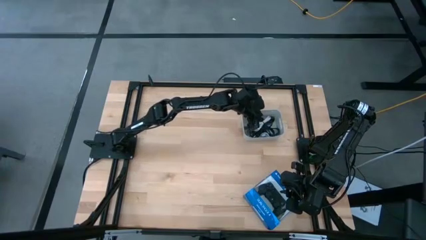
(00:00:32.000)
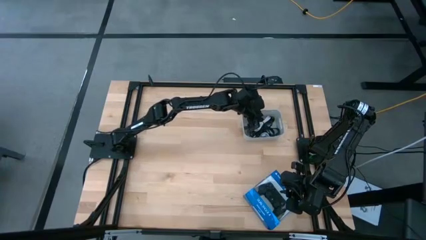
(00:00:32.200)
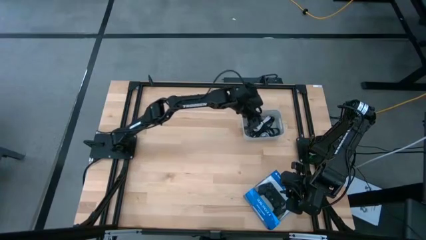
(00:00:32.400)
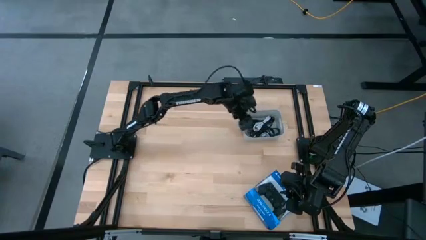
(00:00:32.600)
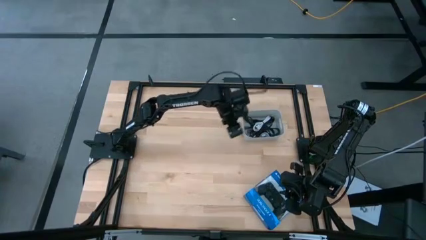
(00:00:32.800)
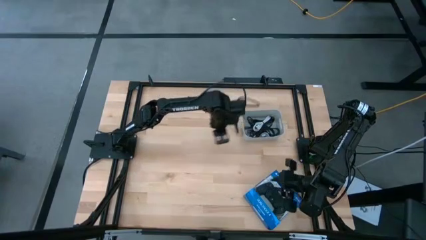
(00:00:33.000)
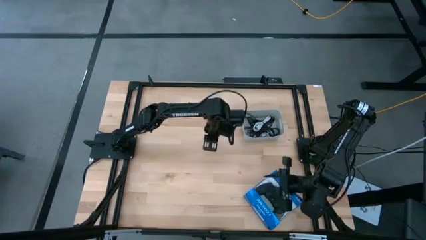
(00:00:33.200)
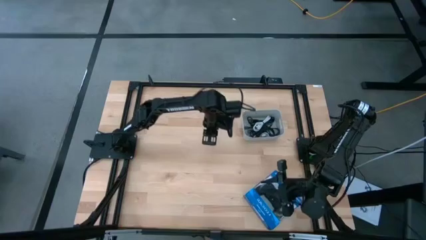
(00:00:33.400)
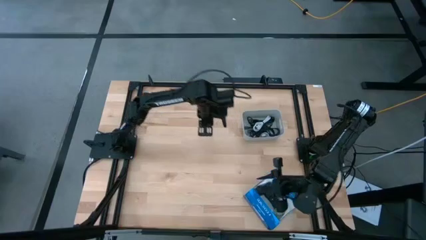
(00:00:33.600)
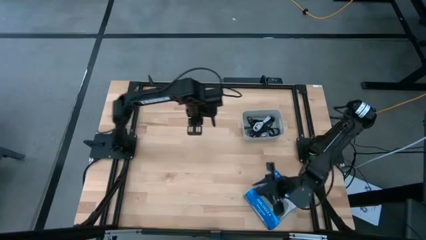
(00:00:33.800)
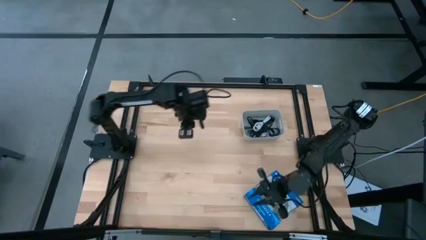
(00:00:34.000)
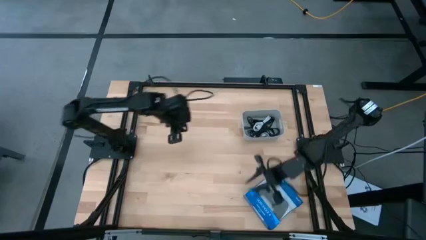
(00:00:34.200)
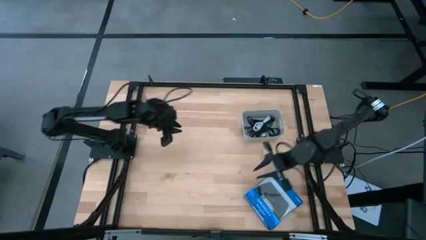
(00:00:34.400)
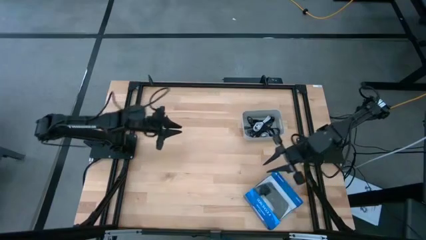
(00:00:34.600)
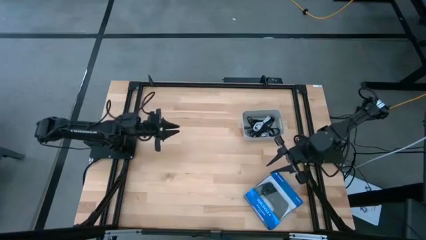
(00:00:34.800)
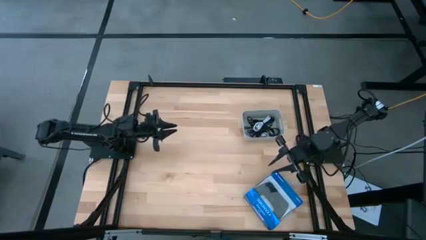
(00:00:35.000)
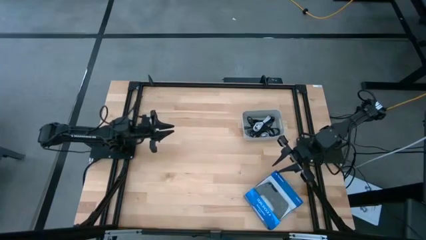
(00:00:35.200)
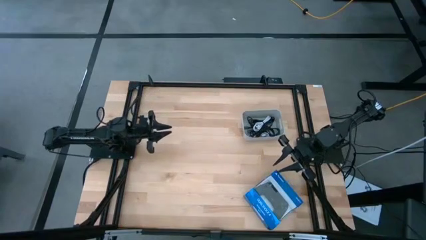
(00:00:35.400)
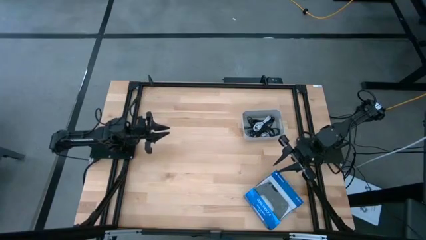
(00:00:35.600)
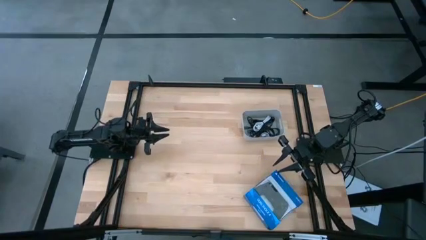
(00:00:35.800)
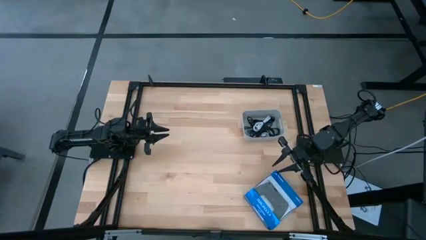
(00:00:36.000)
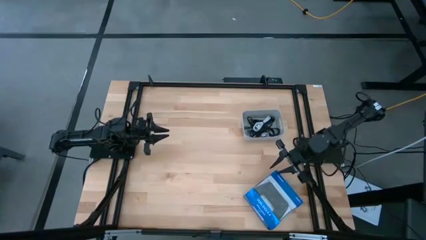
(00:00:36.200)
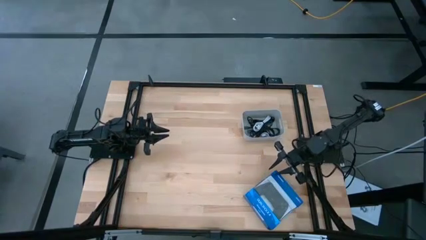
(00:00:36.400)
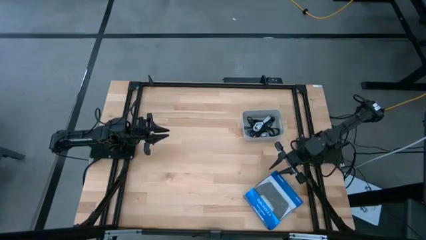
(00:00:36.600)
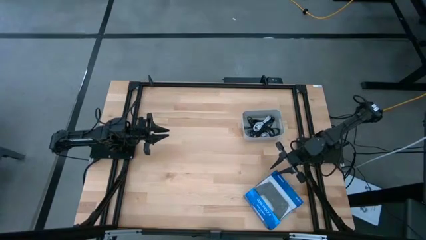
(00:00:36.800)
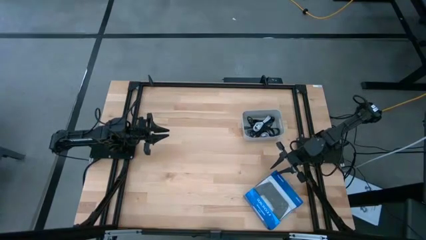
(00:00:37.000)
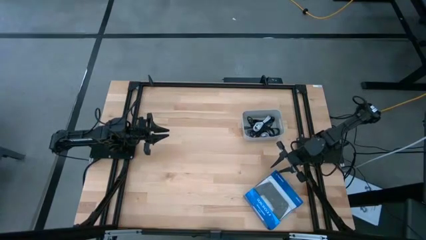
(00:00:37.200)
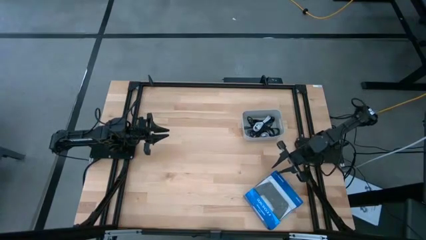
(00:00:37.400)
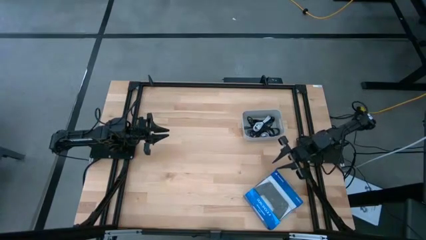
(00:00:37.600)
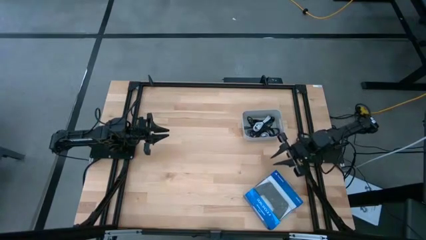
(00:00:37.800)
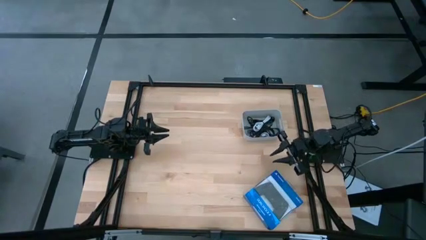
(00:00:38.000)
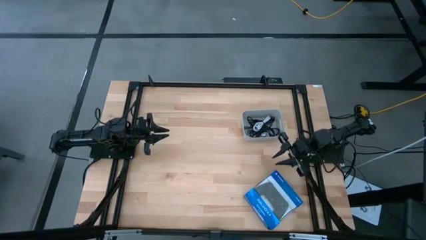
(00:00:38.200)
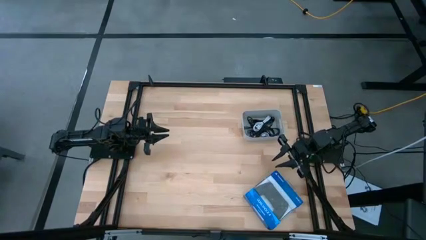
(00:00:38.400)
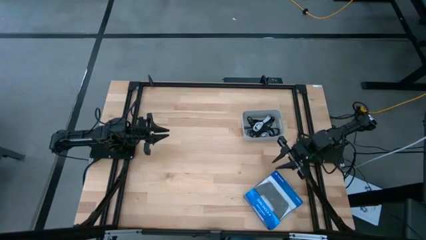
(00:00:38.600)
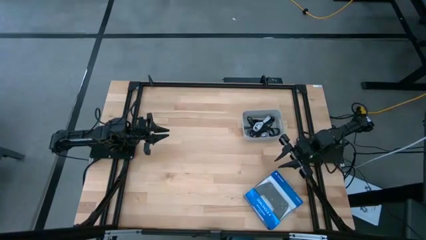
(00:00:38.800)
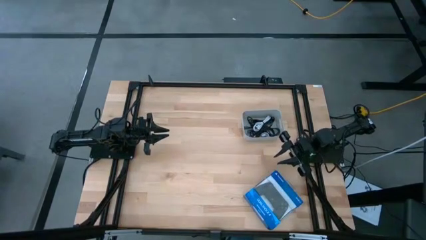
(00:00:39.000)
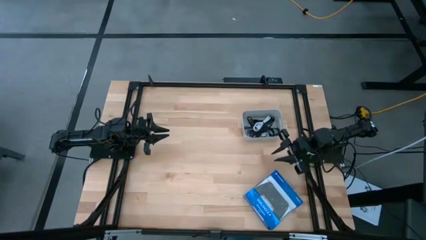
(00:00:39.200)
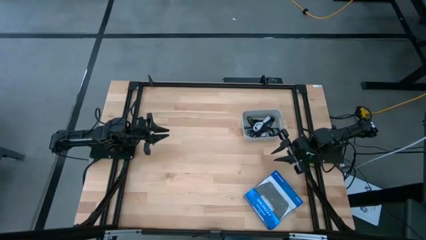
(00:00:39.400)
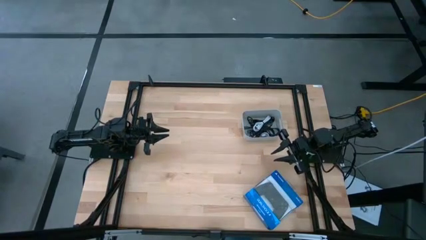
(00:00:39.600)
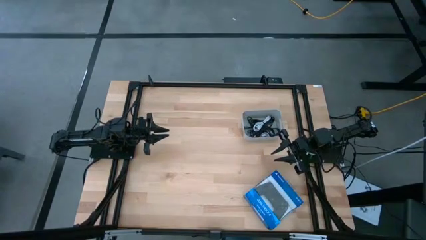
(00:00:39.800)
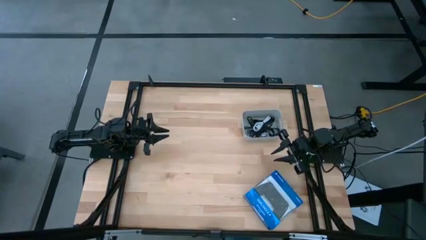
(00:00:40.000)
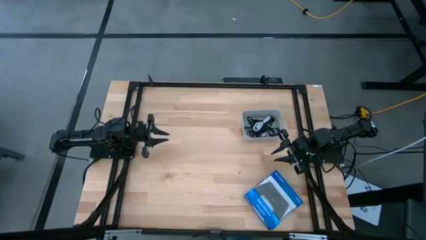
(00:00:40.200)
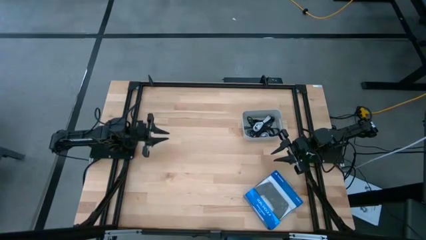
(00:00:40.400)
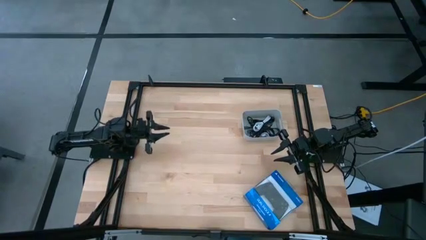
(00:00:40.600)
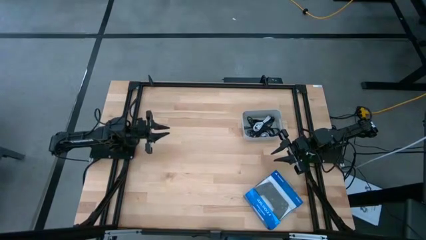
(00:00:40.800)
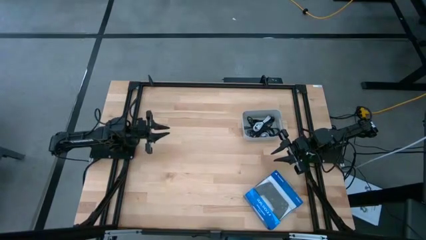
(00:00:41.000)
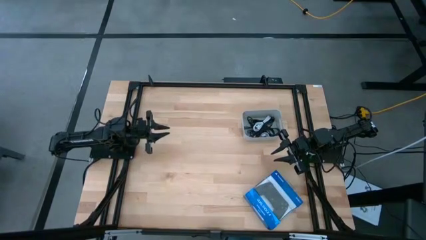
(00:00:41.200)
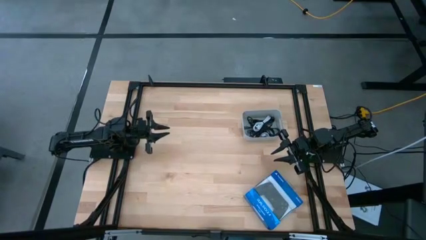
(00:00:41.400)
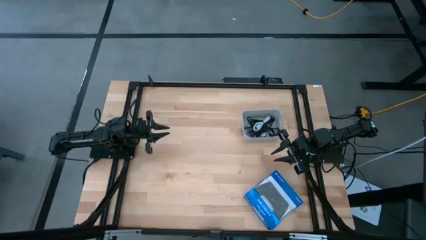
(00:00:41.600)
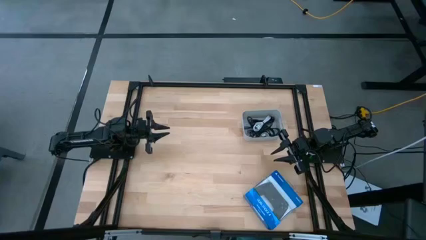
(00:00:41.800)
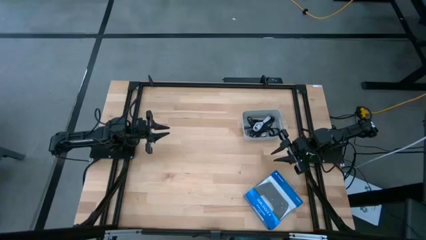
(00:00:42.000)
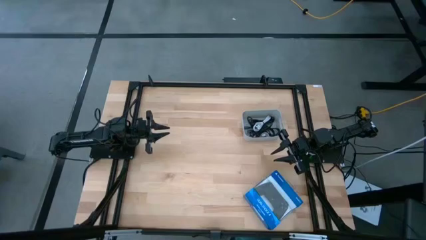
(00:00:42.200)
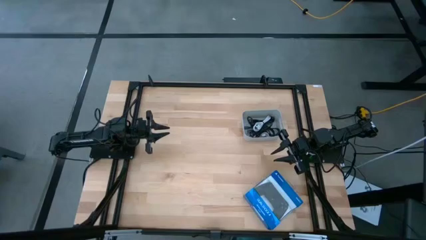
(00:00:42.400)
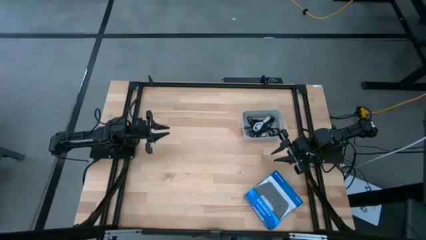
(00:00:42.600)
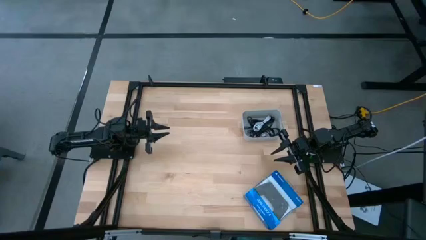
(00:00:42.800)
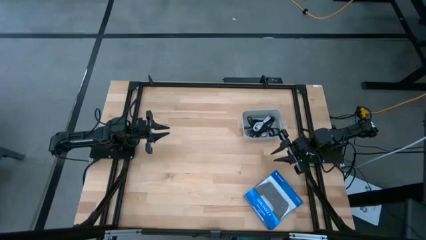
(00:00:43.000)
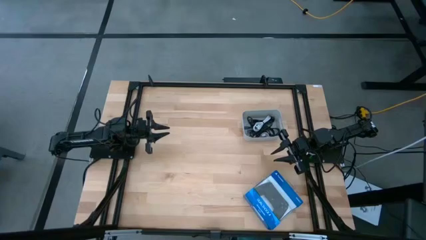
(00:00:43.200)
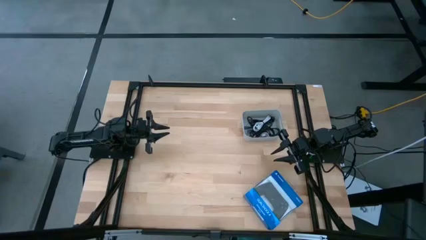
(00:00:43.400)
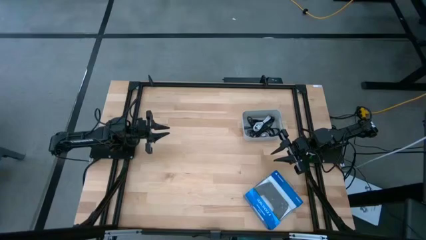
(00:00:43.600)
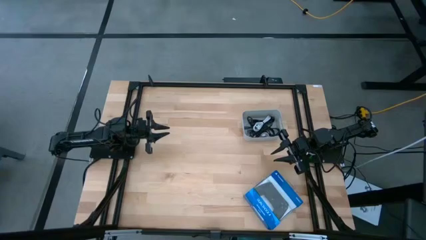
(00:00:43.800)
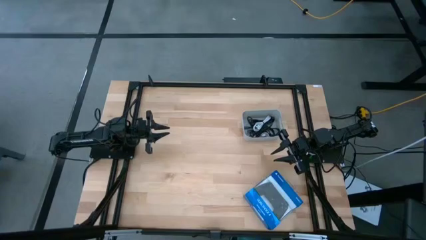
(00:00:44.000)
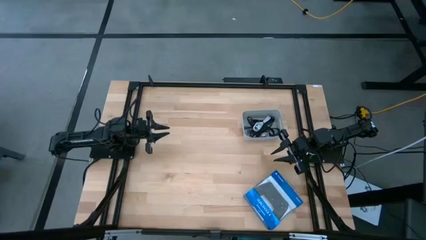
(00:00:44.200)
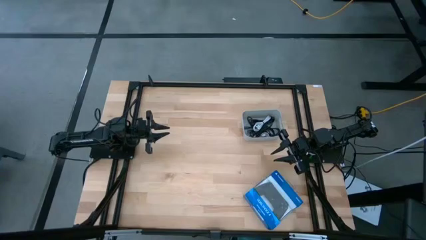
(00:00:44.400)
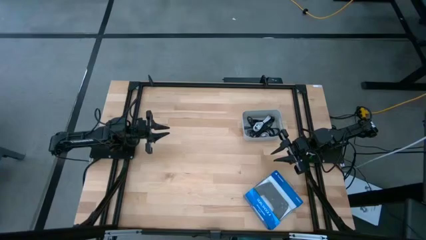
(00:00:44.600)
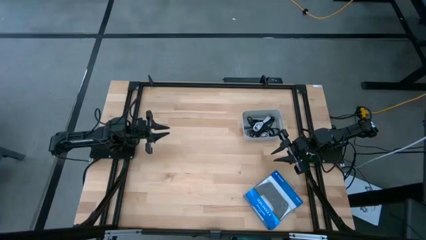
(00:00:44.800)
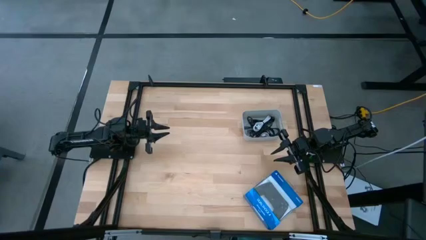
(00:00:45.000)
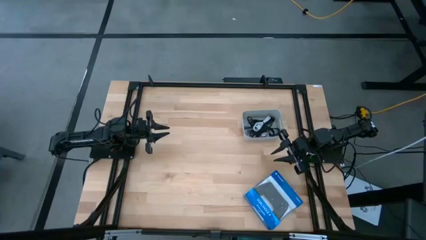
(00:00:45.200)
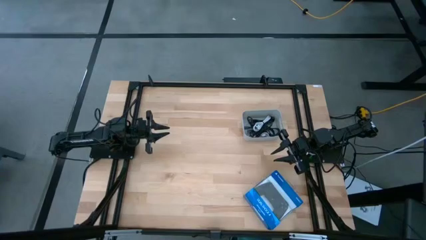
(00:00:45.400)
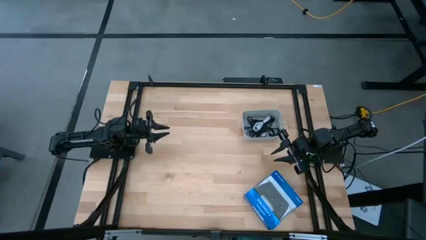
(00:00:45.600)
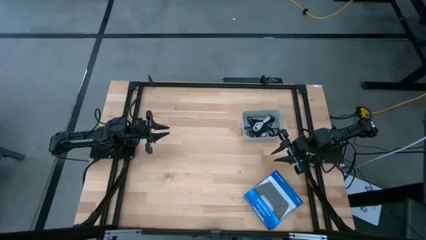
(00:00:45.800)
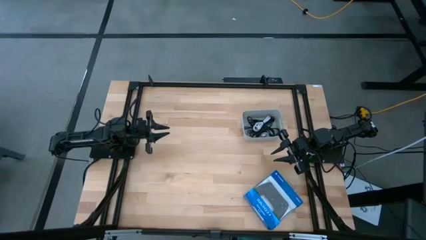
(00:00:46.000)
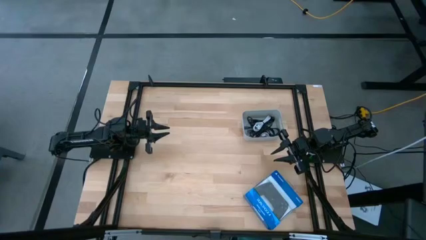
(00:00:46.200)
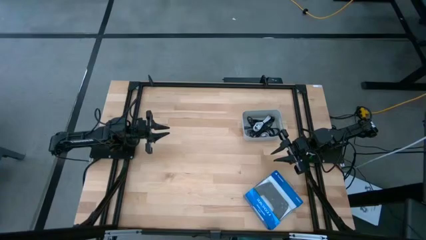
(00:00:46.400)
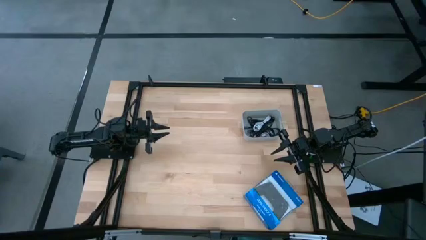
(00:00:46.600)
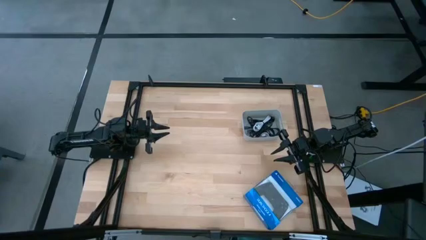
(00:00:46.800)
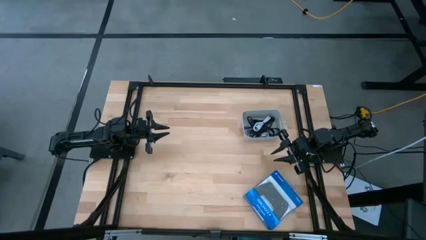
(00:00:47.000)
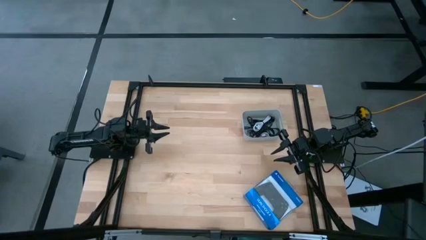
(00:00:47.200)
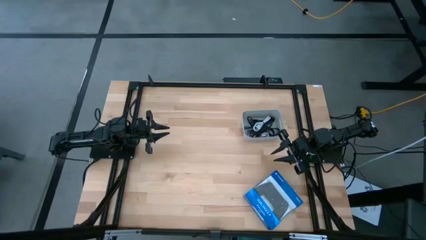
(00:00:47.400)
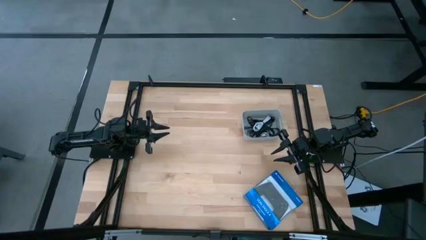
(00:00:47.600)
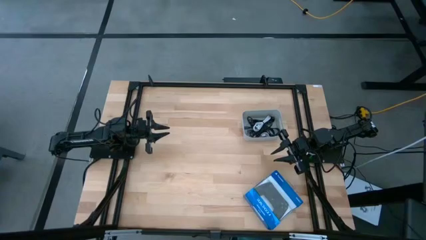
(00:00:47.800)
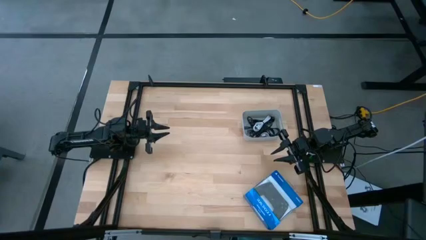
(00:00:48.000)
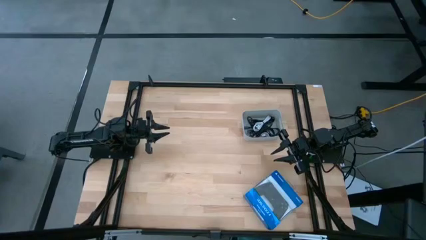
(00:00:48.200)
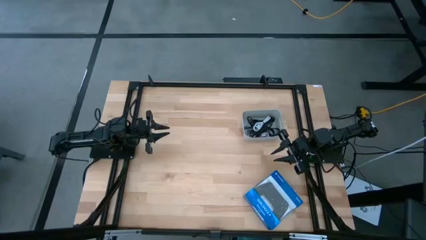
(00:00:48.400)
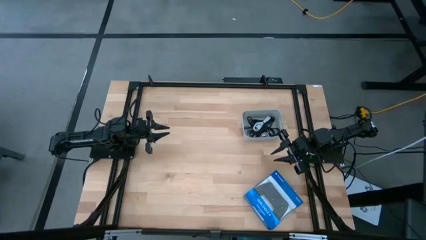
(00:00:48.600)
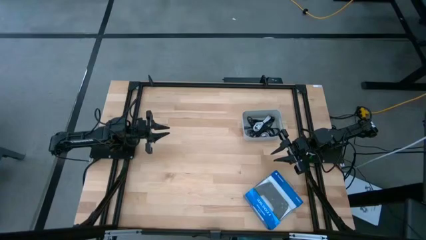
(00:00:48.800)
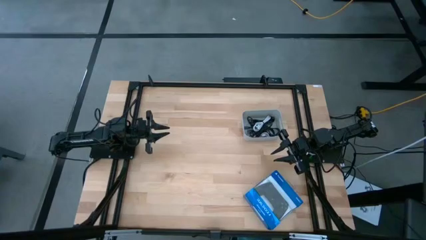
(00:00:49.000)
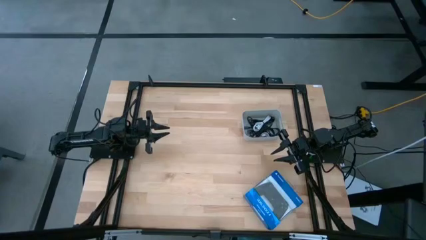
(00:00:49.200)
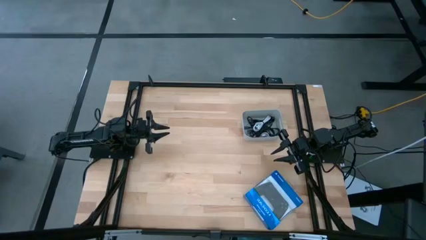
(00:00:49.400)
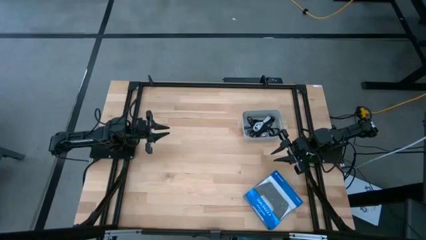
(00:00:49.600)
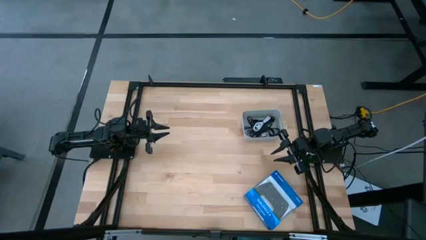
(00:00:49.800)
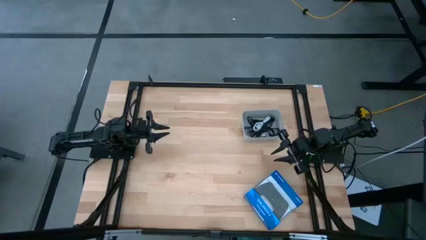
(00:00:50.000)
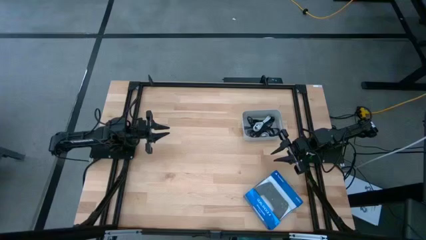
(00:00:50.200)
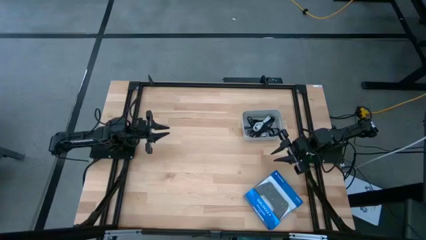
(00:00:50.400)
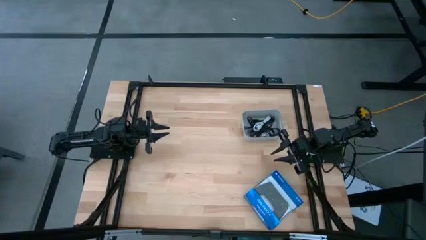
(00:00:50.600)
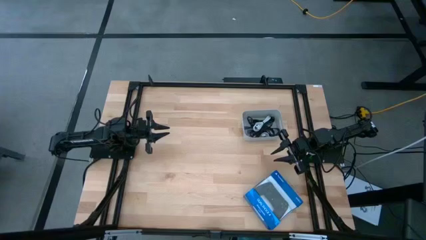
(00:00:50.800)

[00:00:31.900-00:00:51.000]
Task: Pick and place USB-C Cables
Return to Home Position
